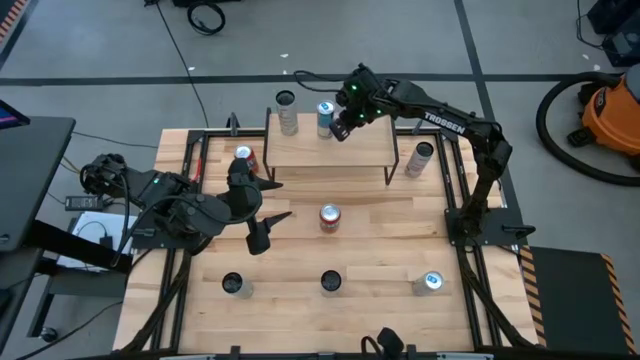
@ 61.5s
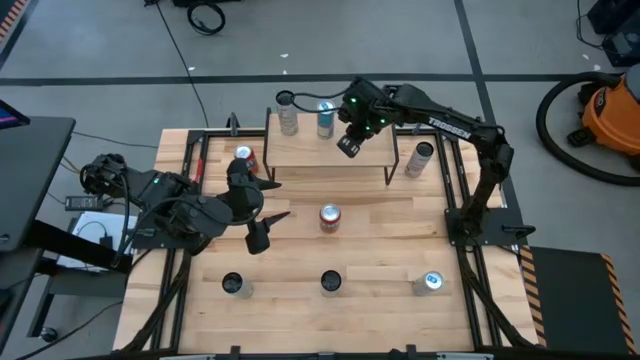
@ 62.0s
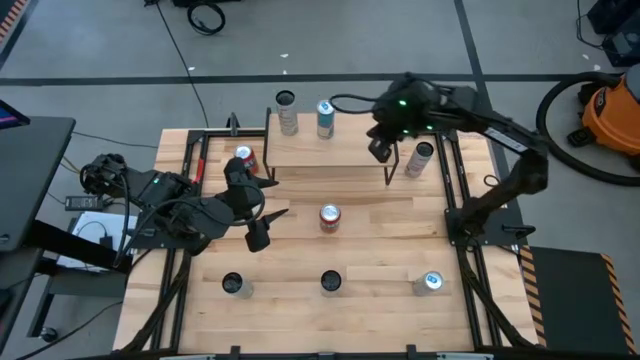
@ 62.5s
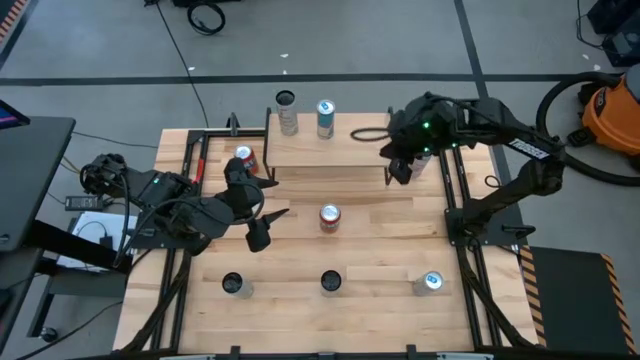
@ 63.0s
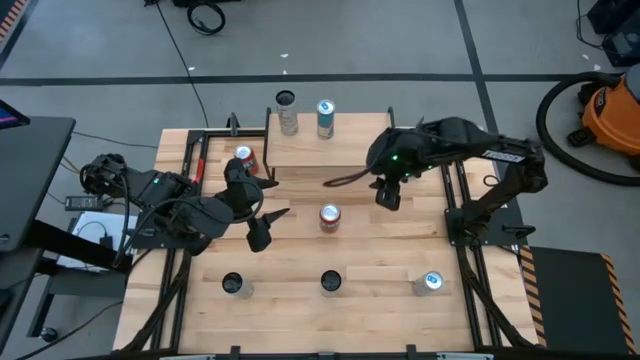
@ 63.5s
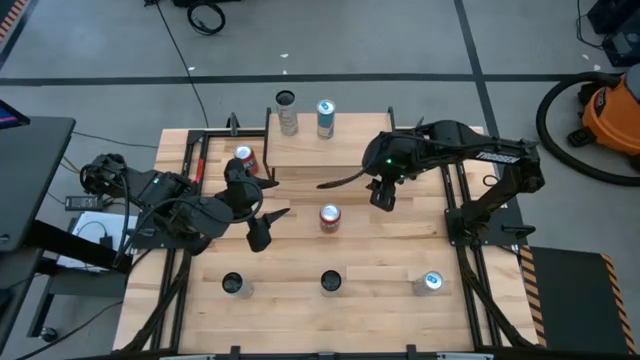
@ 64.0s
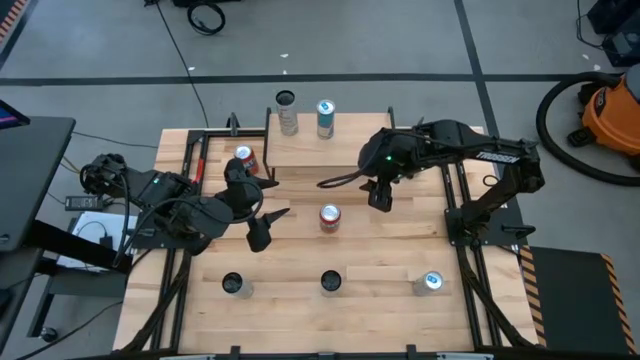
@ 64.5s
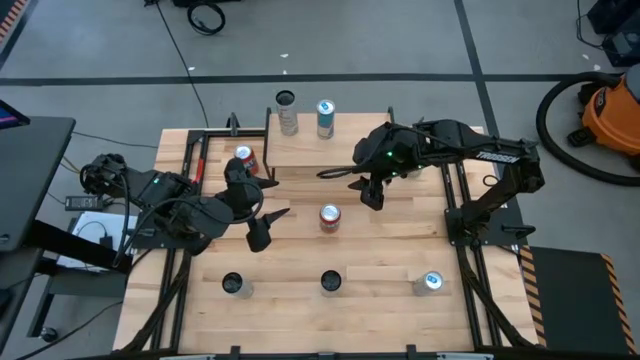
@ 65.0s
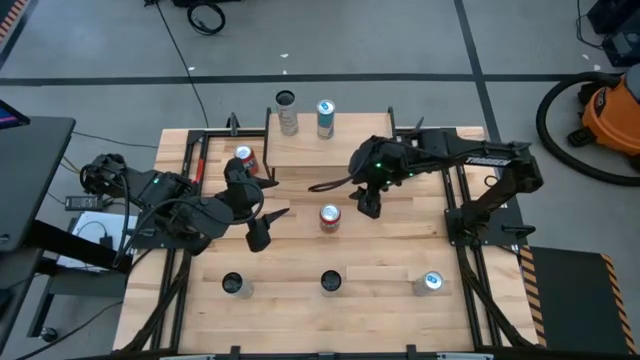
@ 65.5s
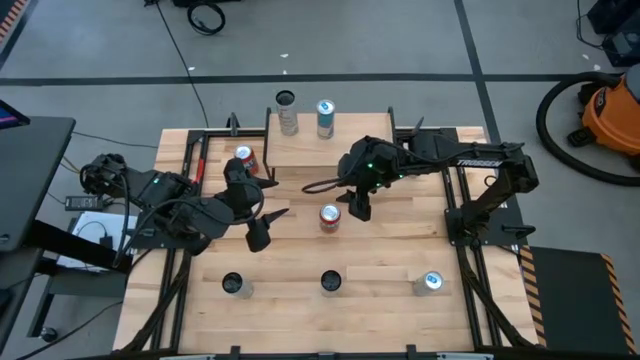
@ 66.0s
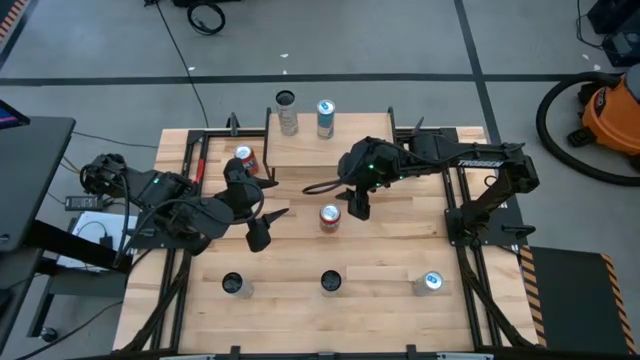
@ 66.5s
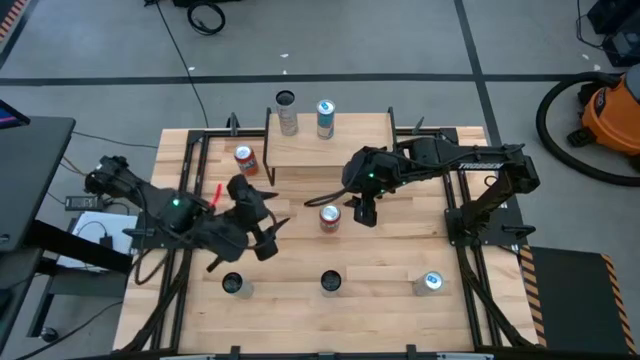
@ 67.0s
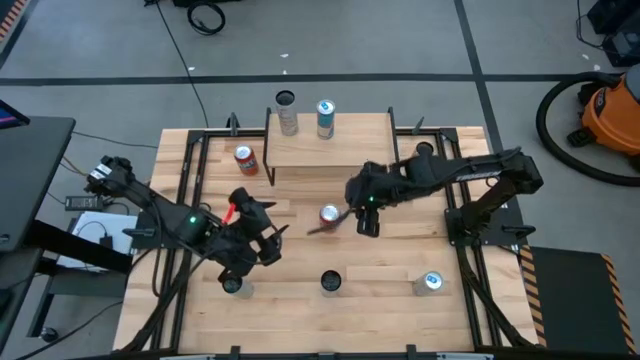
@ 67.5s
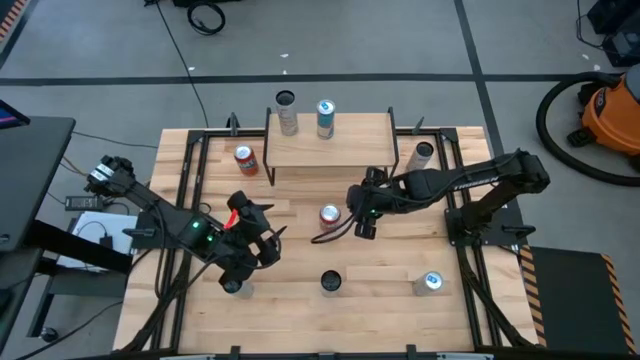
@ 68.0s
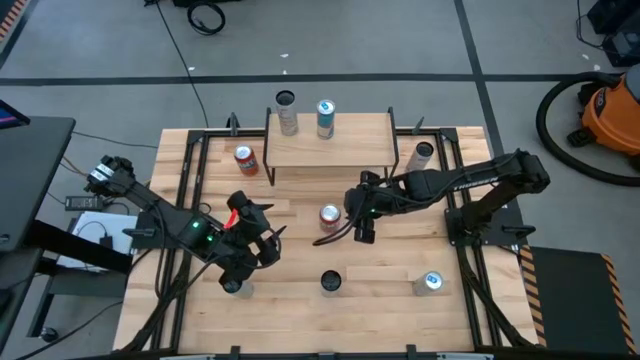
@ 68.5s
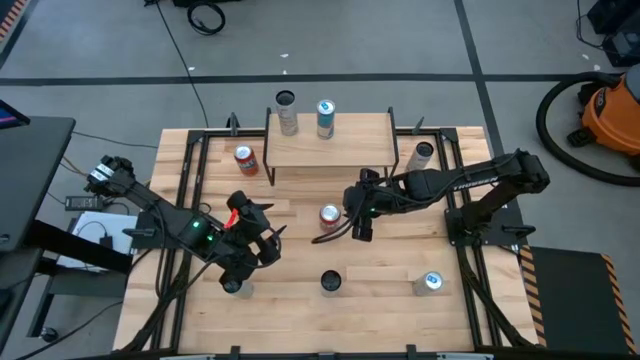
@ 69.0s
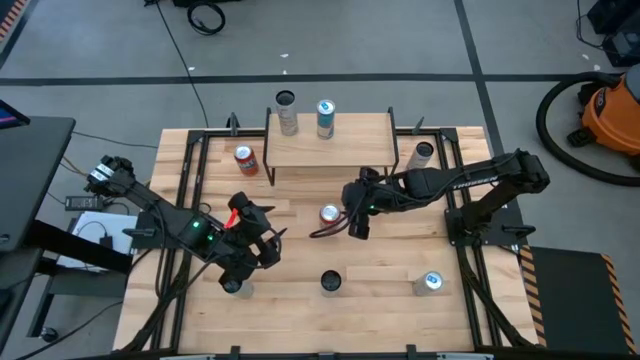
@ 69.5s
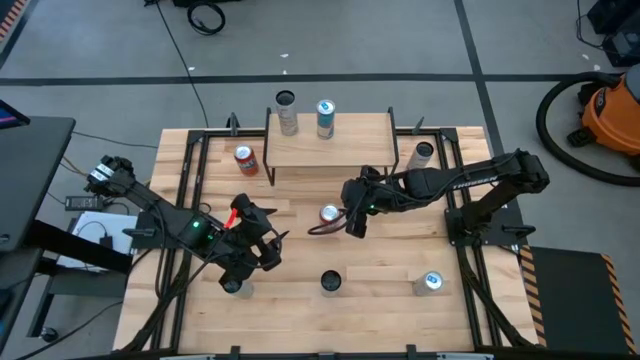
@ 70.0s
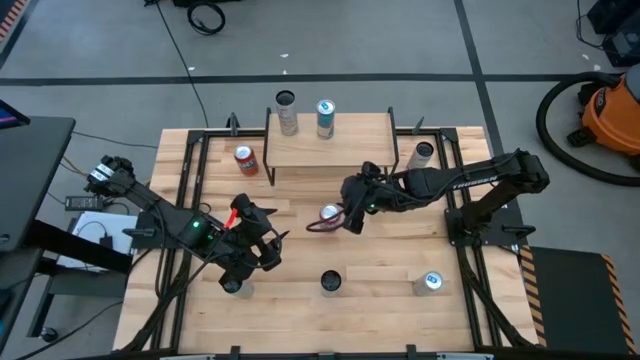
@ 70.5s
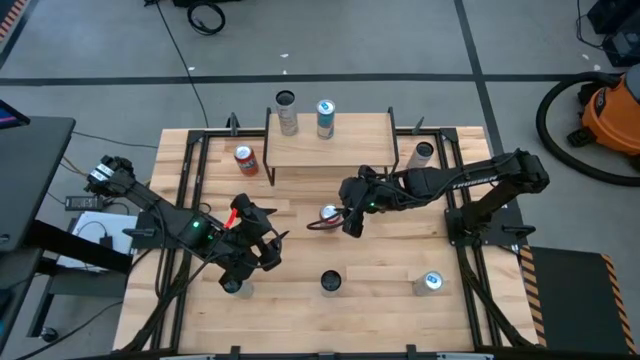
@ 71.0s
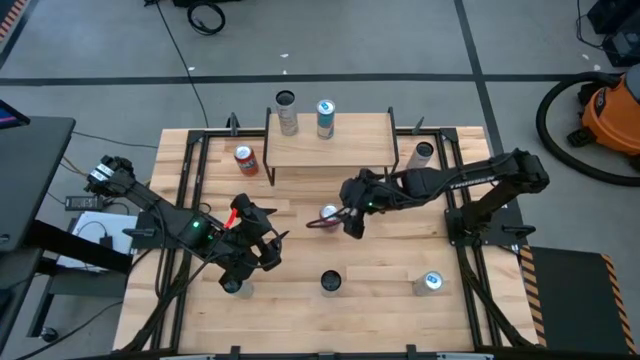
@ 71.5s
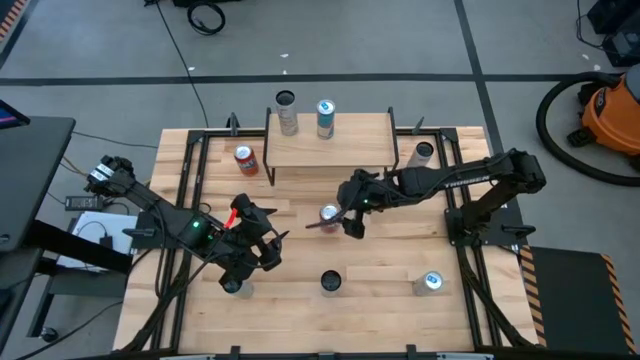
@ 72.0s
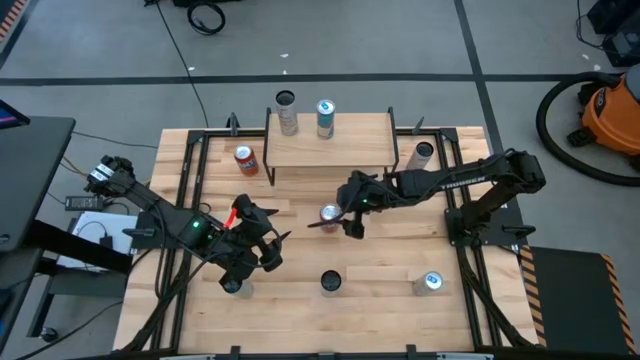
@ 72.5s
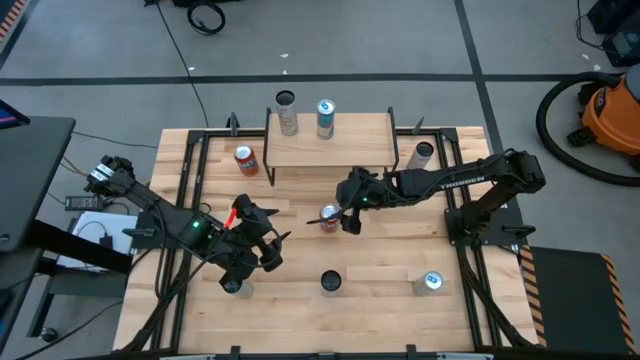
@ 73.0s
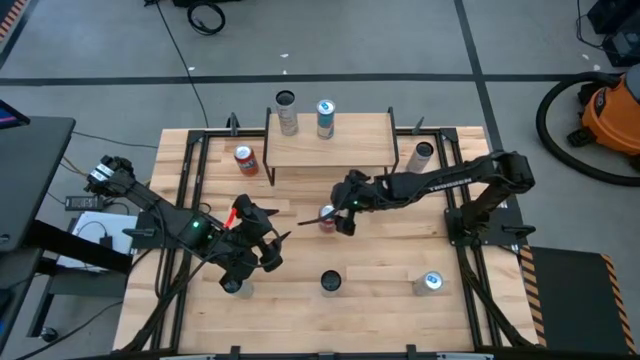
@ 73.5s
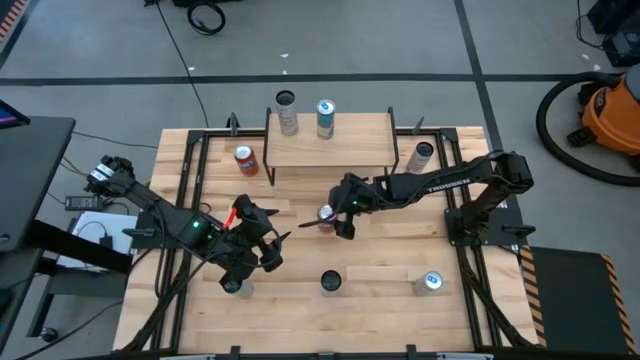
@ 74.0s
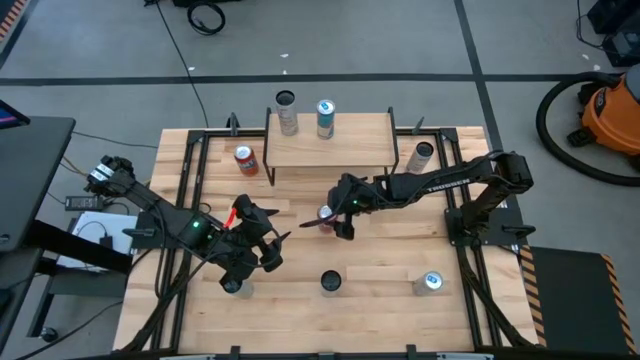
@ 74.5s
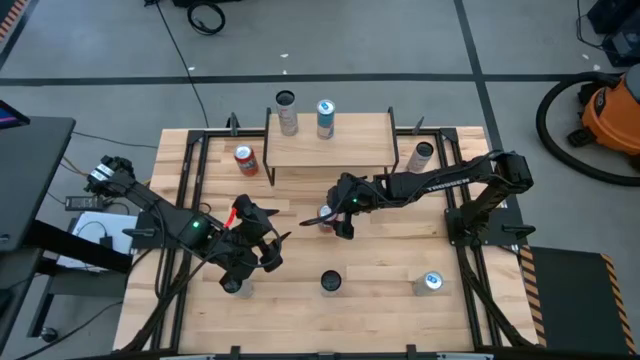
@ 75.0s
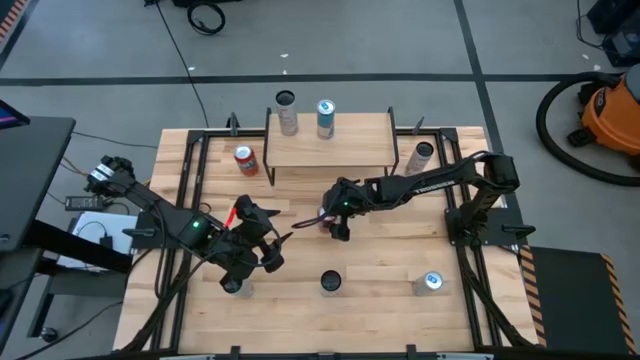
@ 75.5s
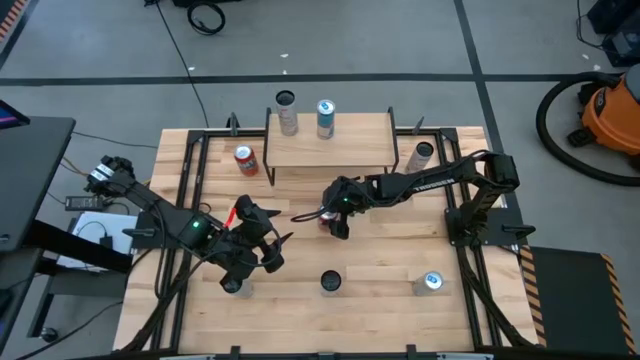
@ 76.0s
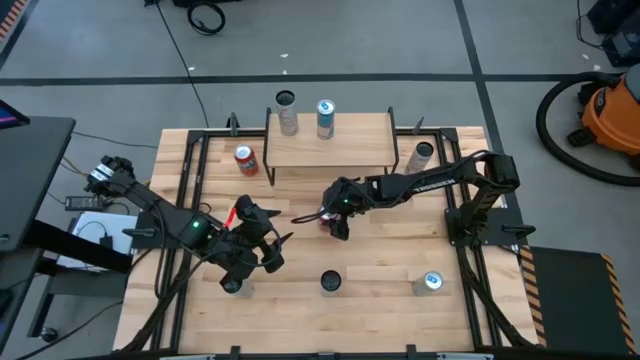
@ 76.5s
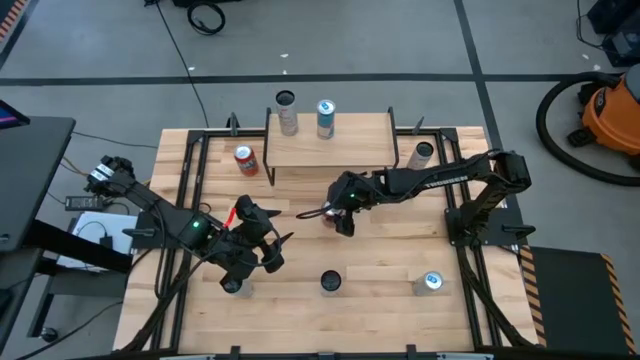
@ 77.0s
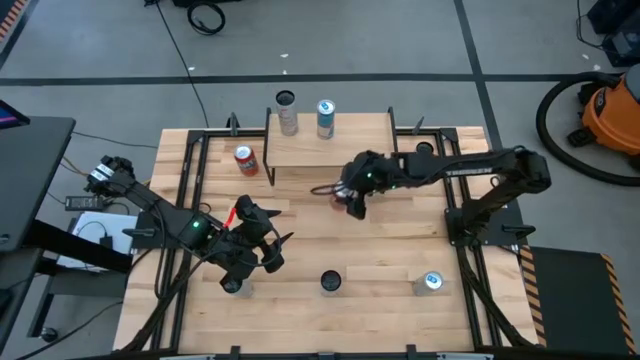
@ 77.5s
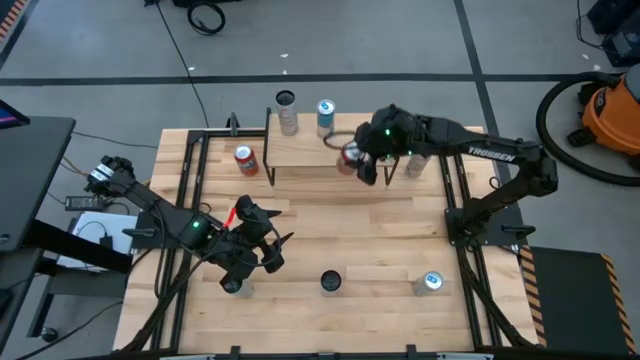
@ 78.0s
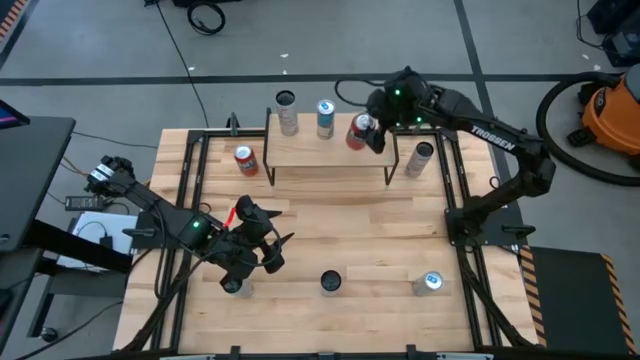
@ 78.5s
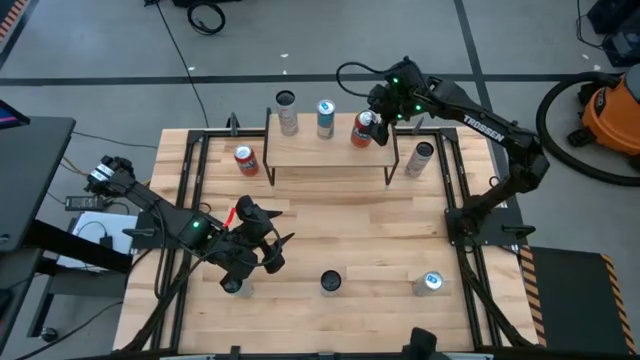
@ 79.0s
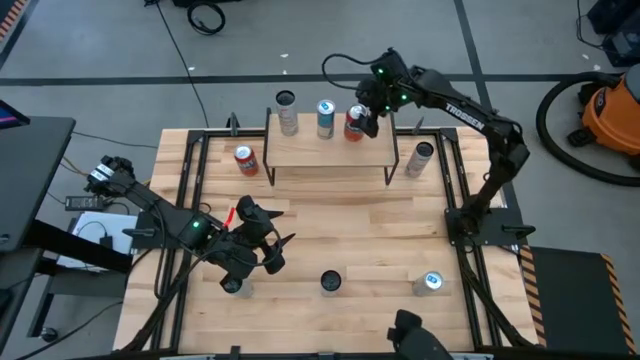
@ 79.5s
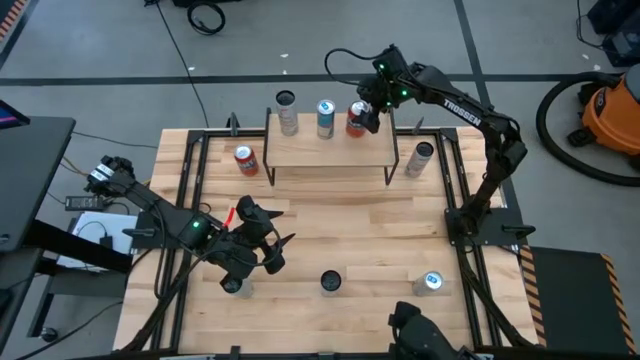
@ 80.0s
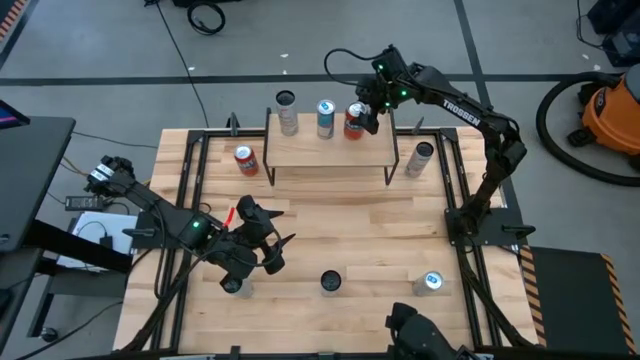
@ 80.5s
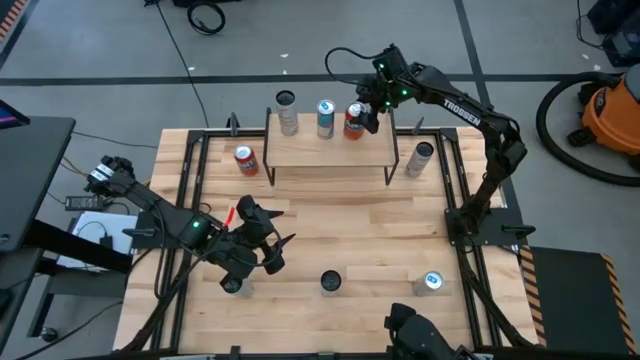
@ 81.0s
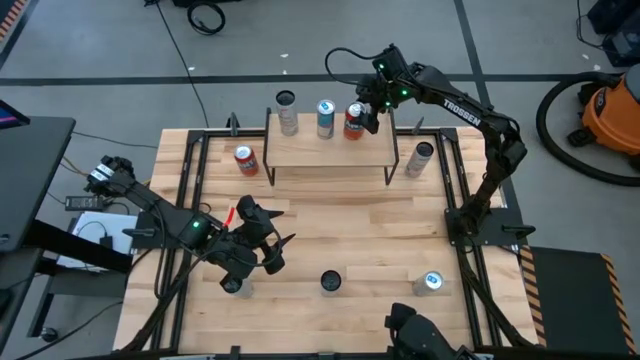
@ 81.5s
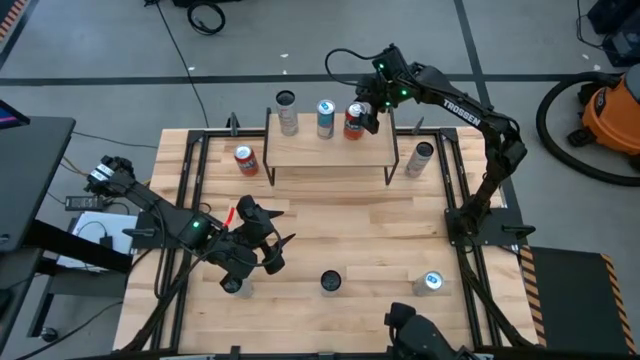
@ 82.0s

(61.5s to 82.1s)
Task: Place canned beverage on shelf
Put the bottom red soda can on the shelf

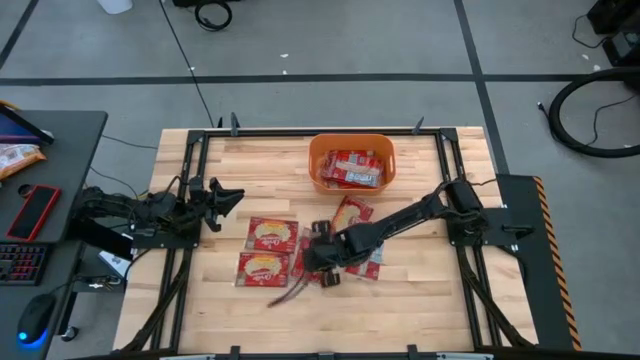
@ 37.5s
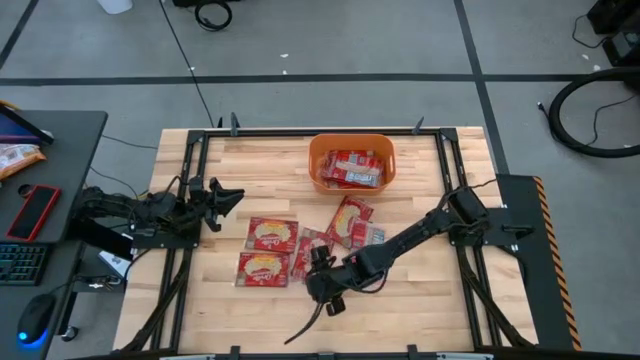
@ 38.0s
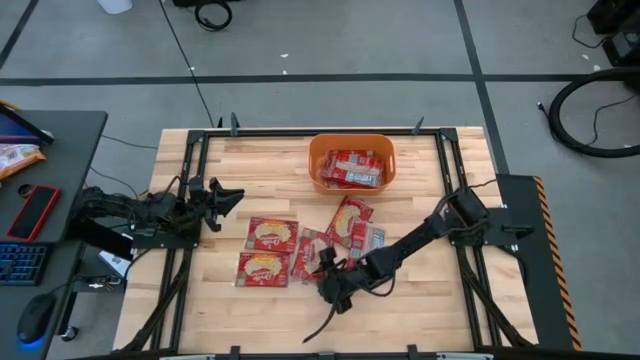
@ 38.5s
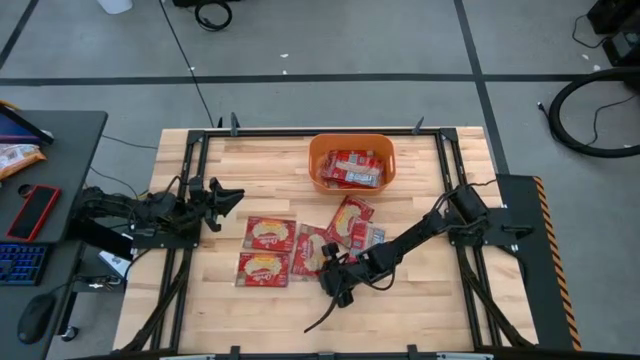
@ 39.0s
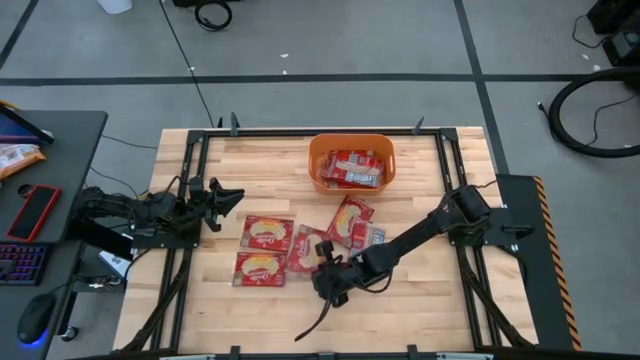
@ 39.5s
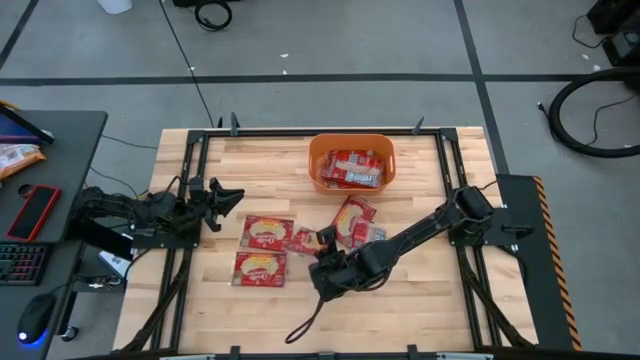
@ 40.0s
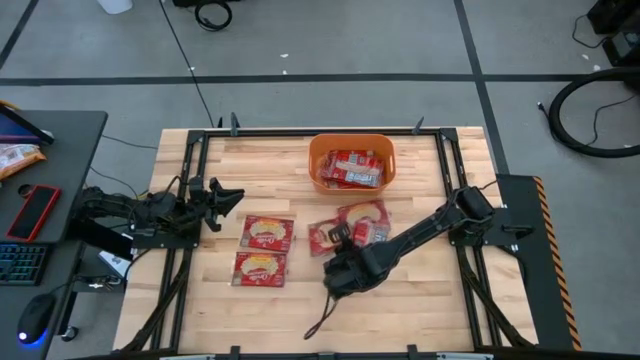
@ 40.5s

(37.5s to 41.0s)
Task: Sort popcorn bags into baskets
Stack the popcorn bag on top of the other popcorn bag into the orange container
